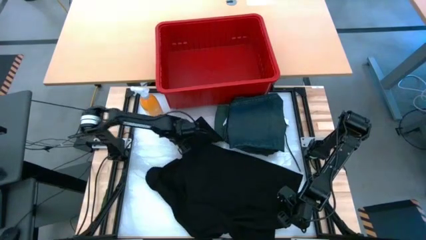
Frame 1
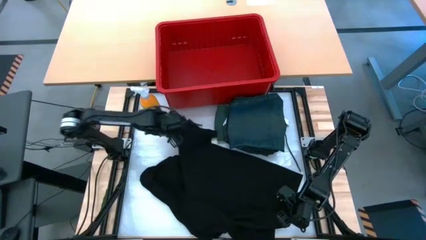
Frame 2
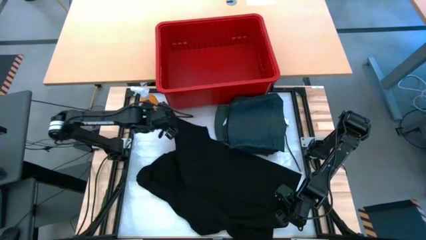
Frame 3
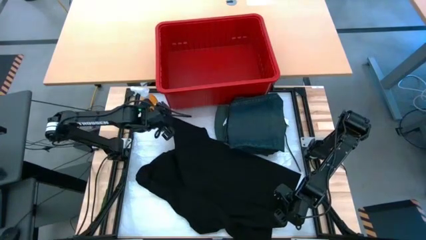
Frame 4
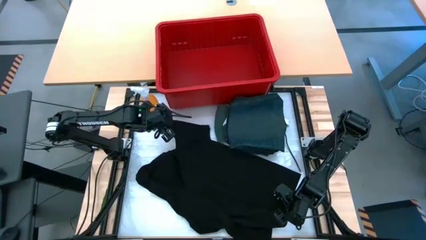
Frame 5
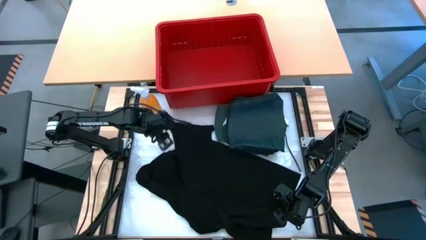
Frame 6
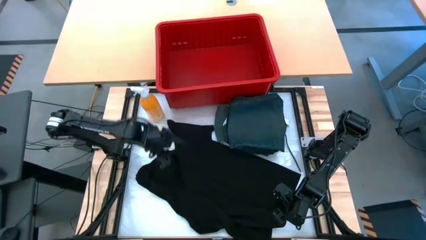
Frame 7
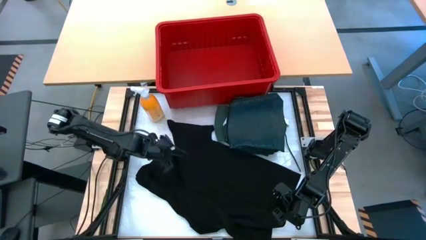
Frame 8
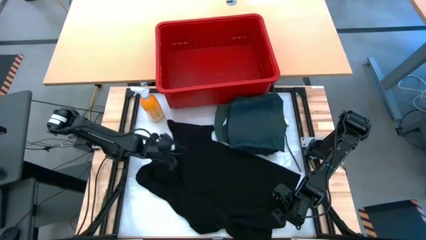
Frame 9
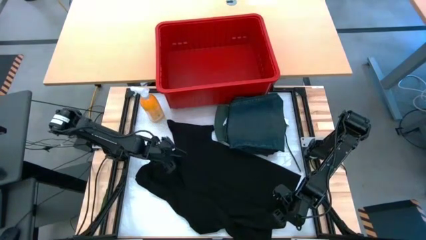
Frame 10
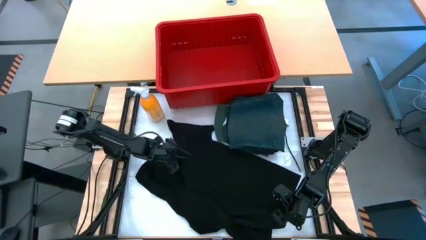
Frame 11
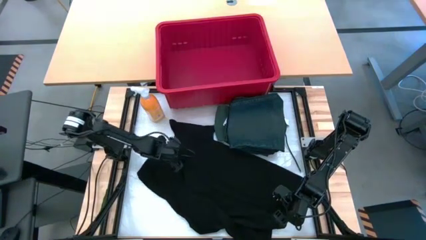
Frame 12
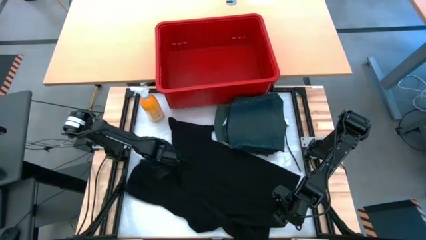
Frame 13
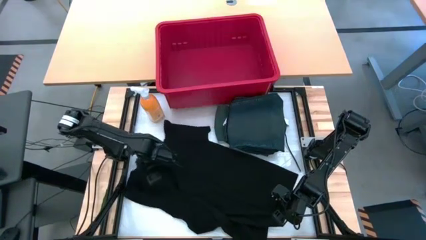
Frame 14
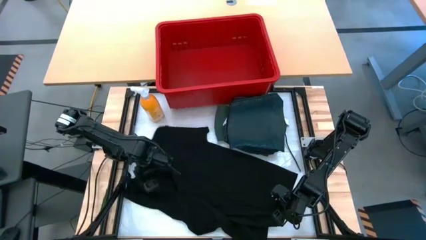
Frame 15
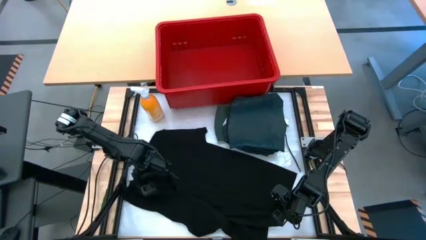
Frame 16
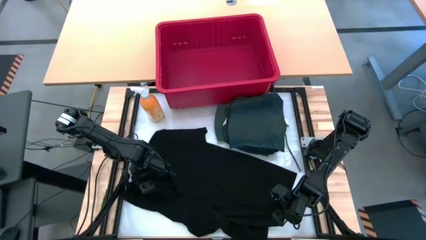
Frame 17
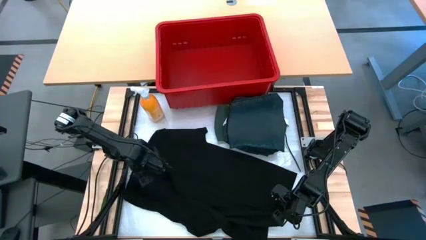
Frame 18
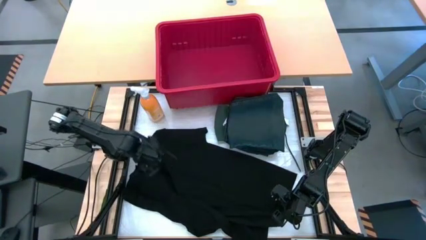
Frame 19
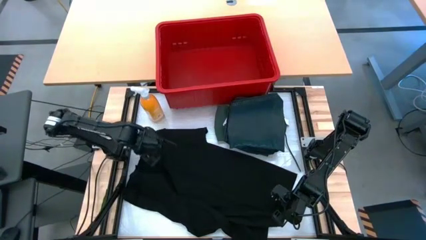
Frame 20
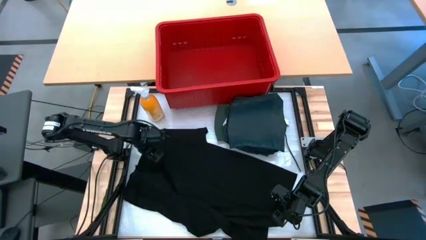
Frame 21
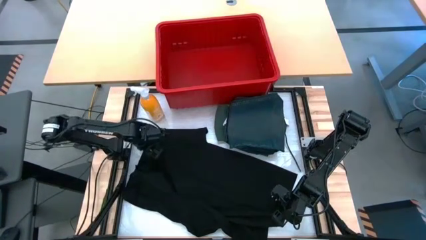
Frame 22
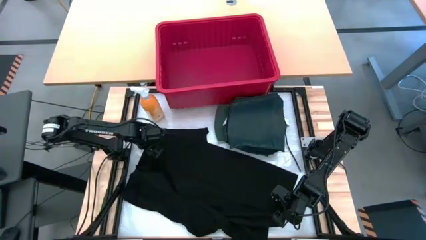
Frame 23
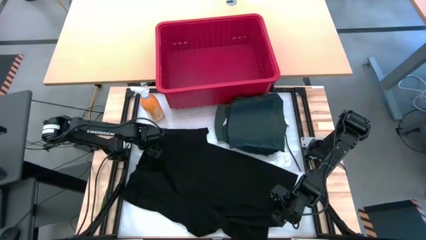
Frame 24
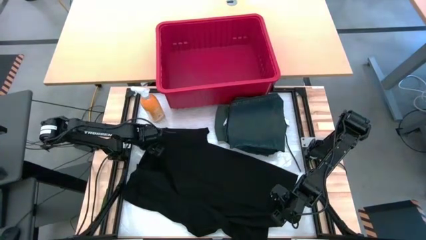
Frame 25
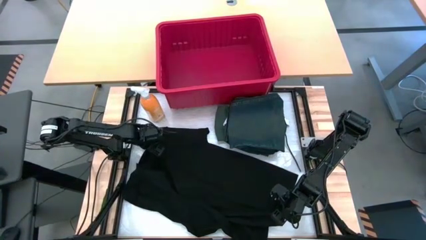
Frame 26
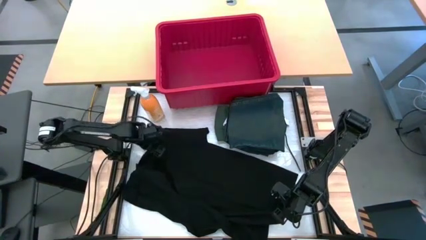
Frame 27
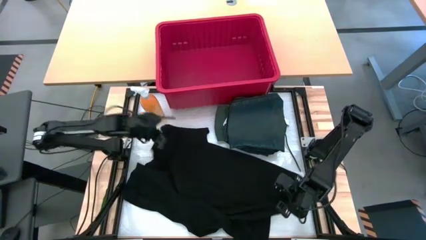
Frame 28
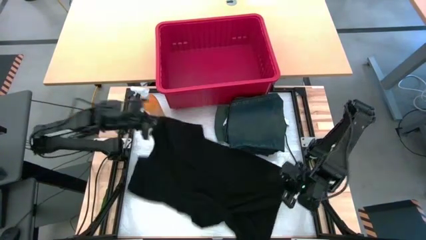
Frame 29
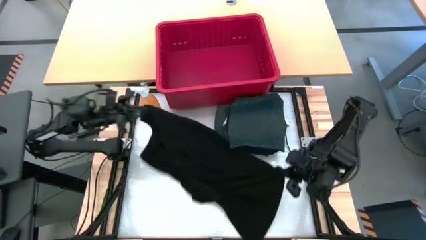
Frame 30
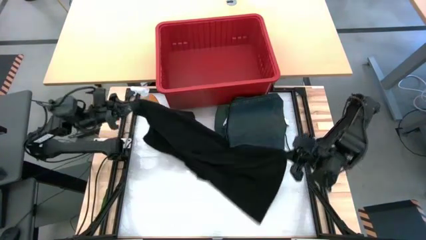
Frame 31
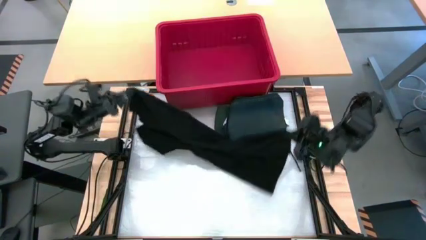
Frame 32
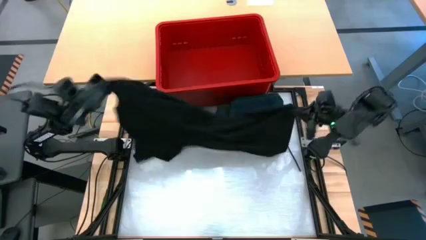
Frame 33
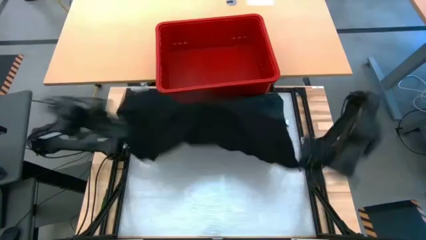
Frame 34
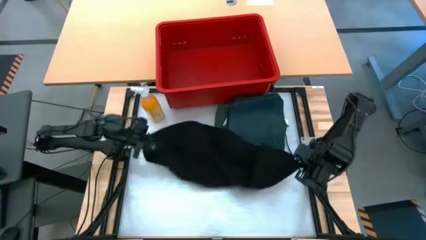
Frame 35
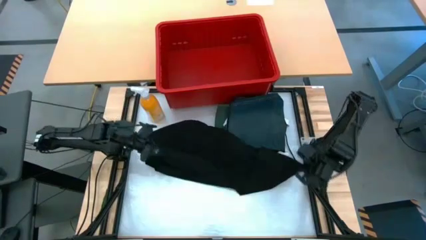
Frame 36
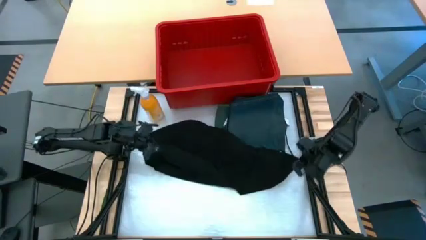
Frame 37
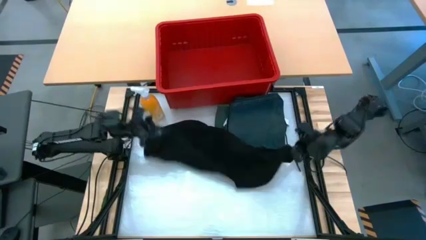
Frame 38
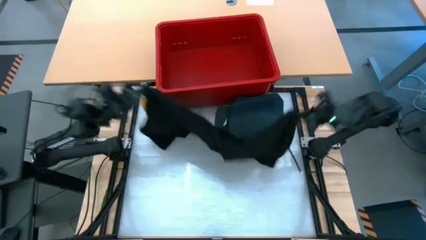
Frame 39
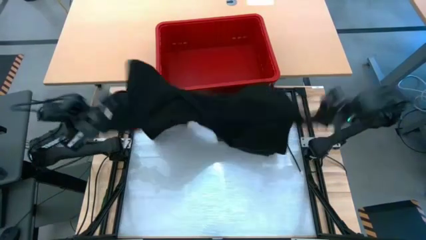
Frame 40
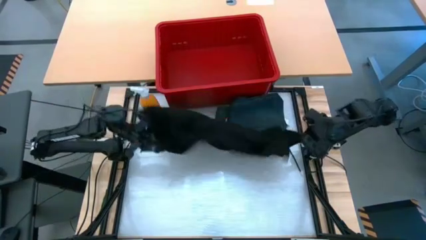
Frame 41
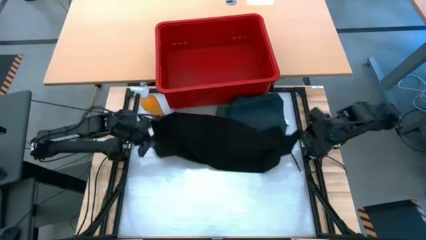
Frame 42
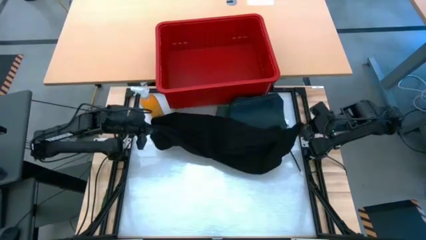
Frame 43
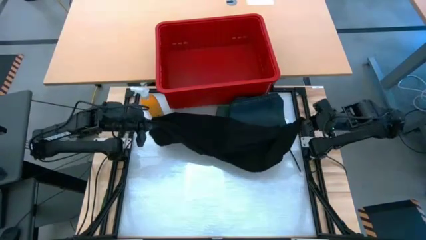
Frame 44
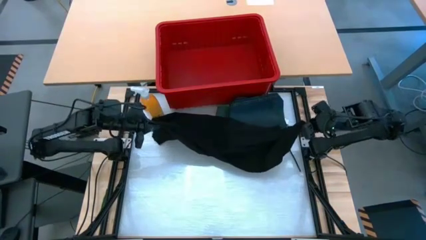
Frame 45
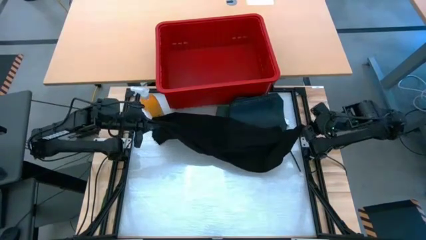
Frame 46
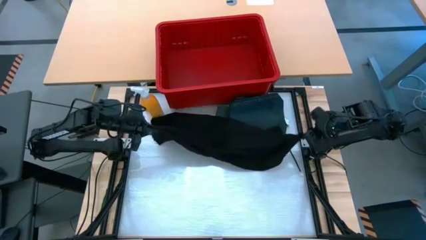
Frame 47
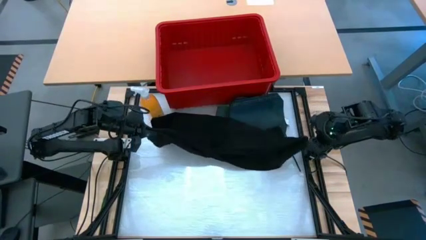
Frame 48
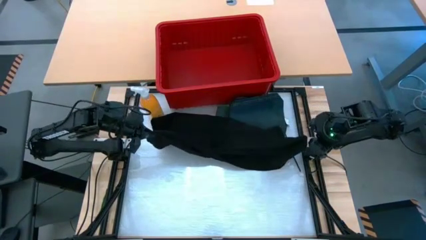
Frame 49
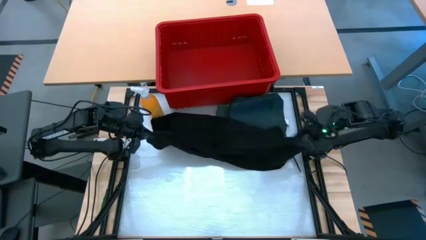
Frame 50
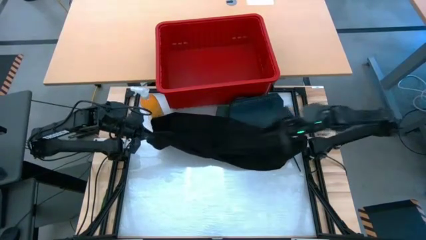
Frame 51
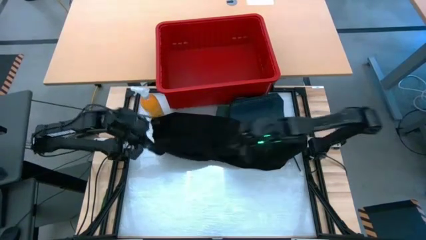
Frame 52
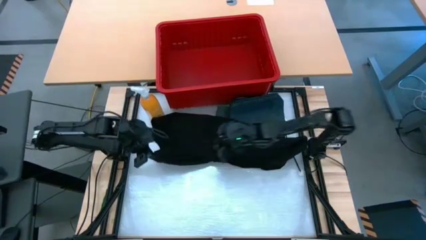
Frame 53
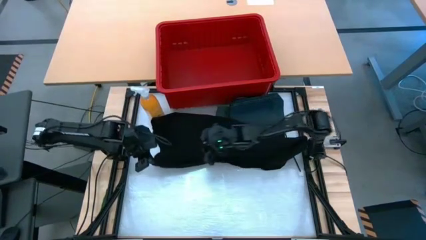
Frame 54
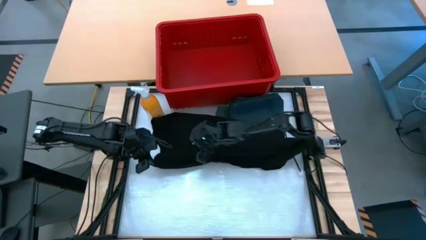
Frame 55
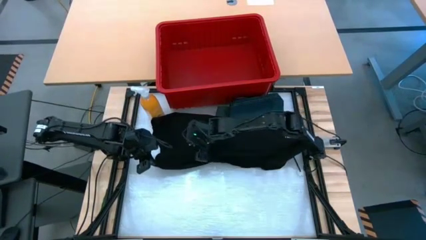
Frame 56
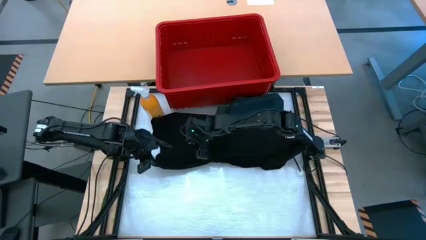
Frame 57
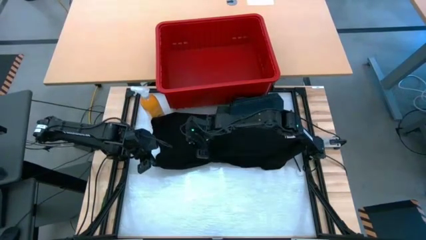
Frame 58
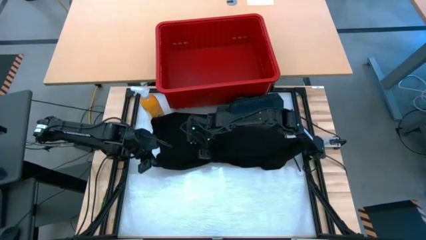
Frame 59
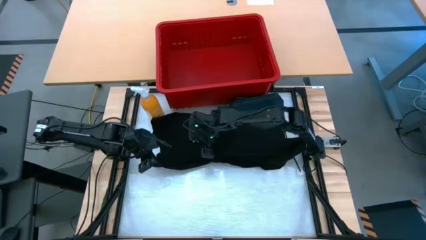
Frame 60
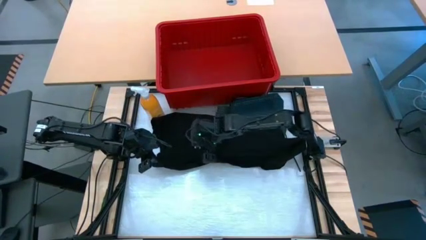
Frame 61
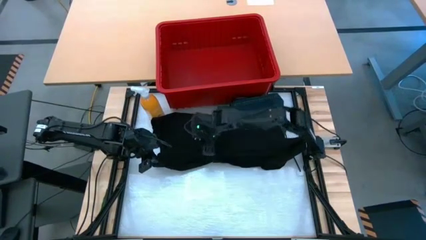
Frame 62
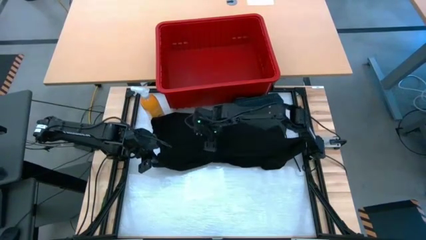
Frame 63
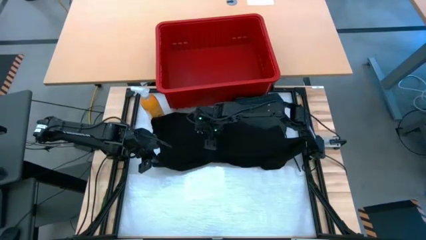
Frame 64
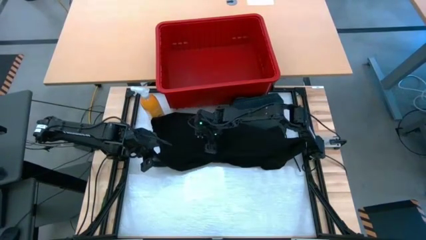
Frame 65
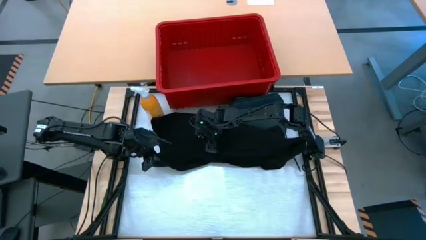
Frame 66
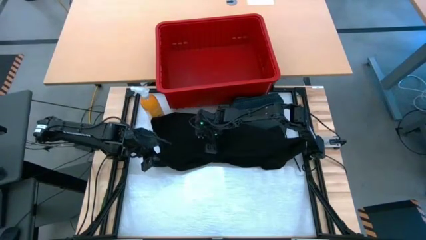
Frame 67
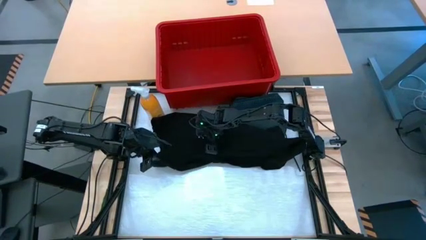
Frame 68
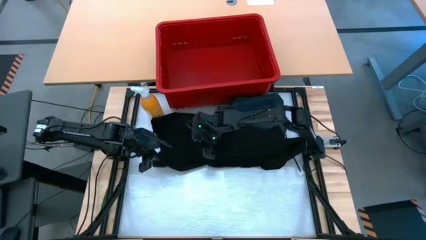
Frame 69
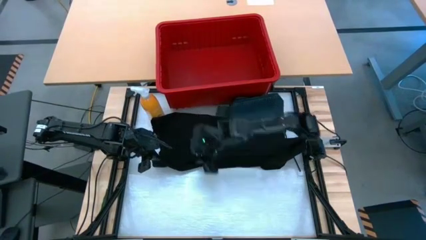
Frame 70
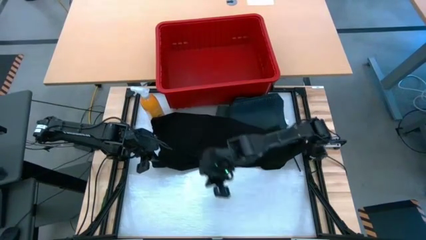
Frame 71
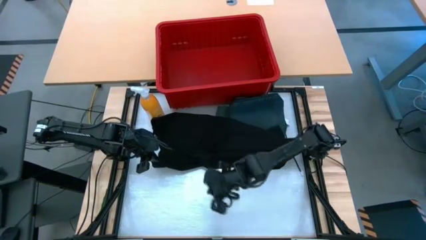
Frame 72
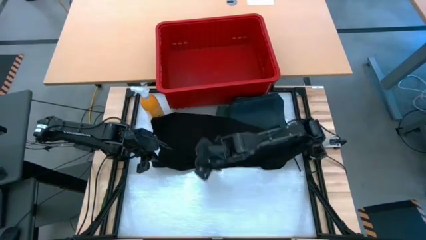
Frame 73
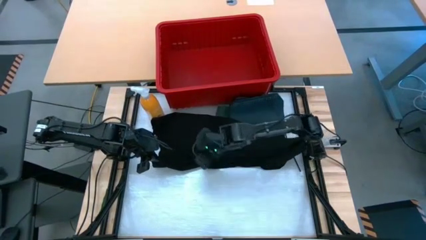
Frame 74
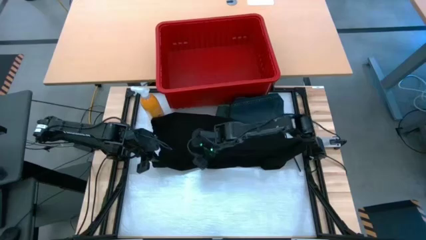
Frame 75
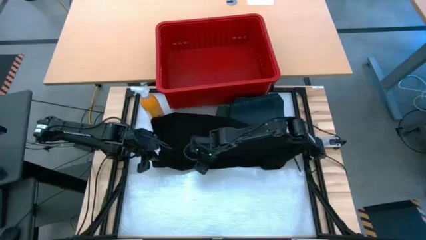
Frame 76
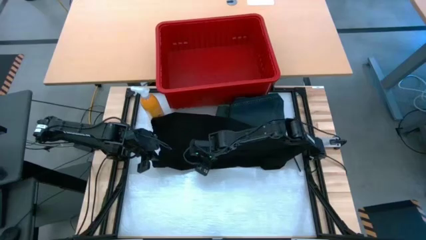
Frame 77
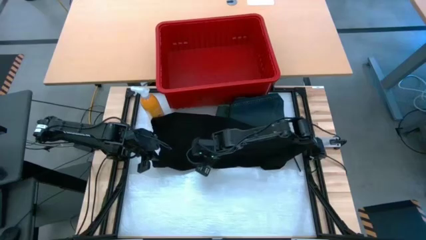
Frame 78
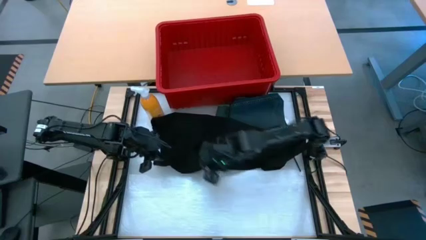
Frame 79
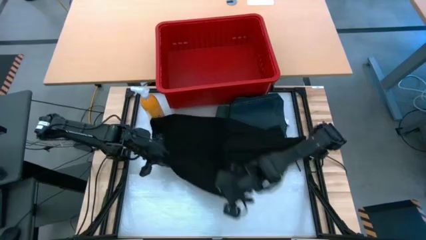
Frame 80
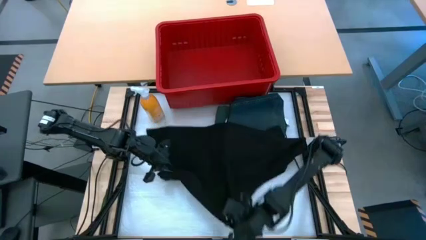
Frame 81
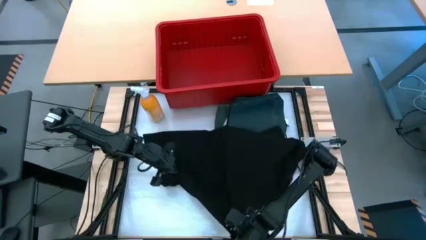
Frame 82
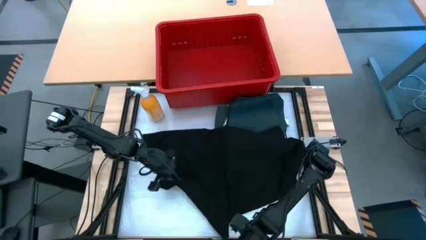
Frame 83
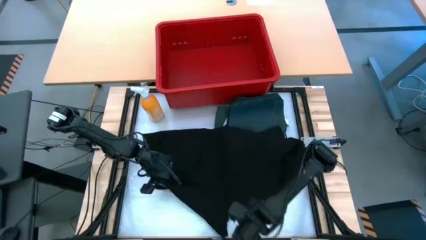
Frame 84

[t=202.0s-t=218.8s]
Task: Fold Laundry from Bin
Fold the black shirt from the red laundry bin
